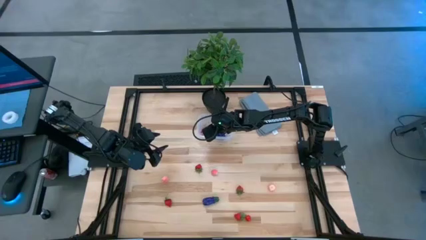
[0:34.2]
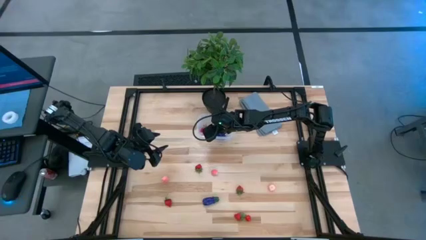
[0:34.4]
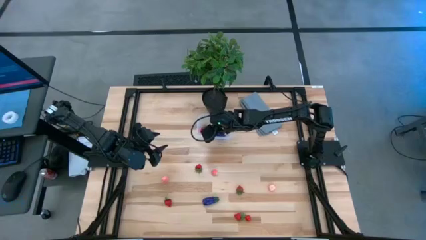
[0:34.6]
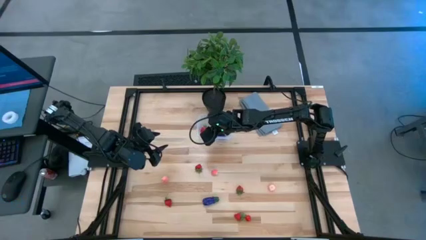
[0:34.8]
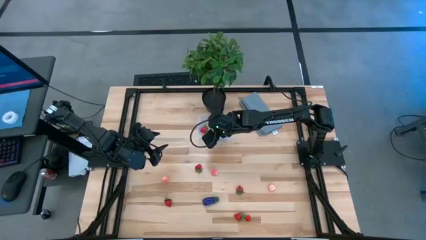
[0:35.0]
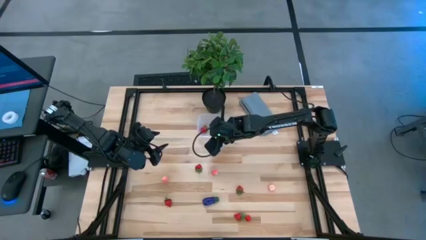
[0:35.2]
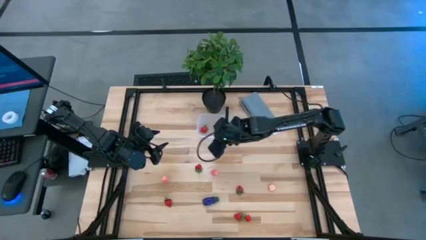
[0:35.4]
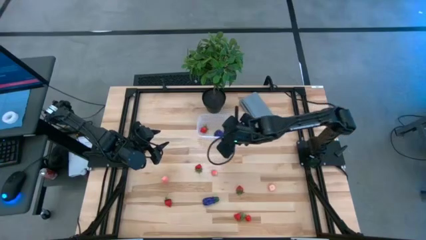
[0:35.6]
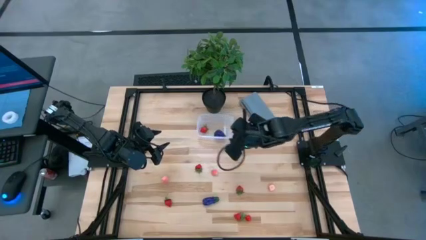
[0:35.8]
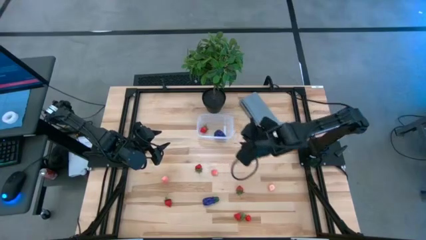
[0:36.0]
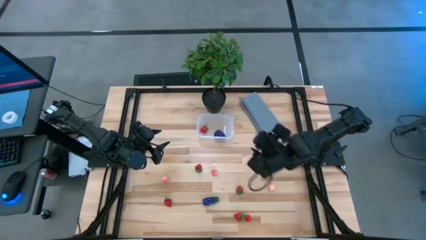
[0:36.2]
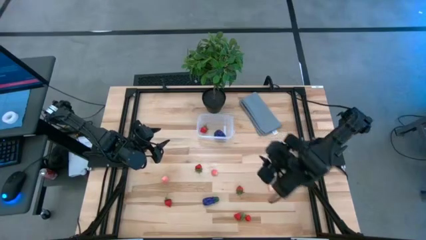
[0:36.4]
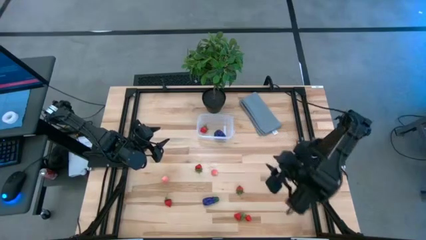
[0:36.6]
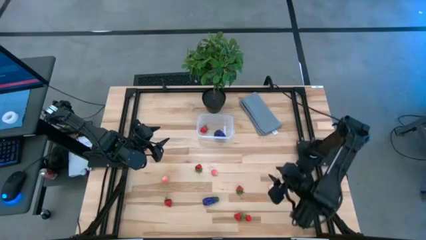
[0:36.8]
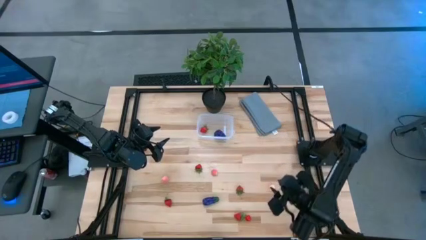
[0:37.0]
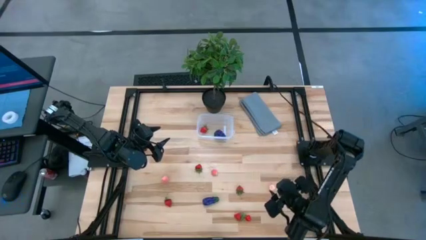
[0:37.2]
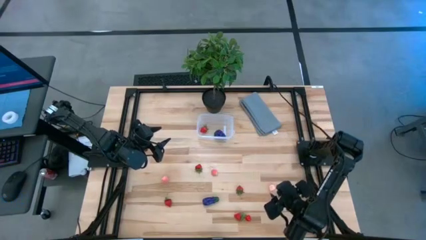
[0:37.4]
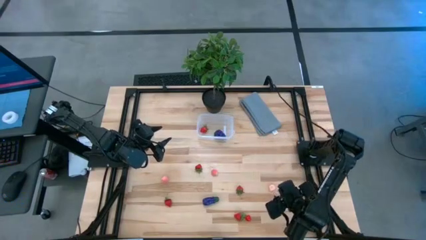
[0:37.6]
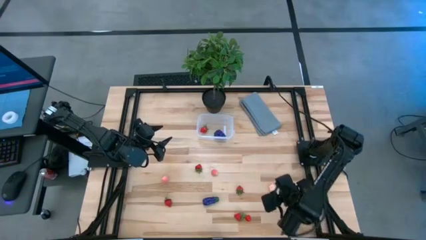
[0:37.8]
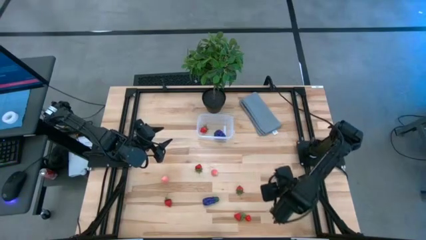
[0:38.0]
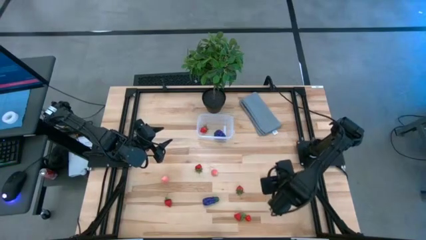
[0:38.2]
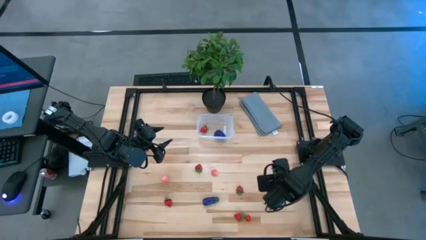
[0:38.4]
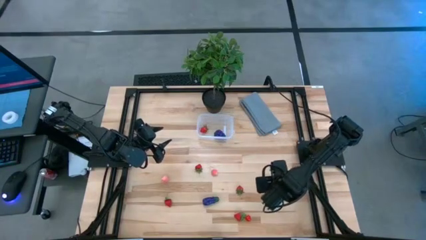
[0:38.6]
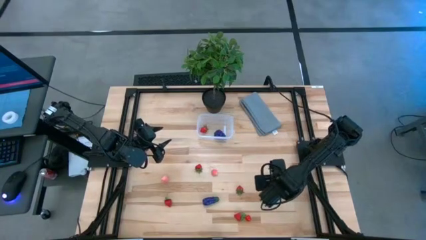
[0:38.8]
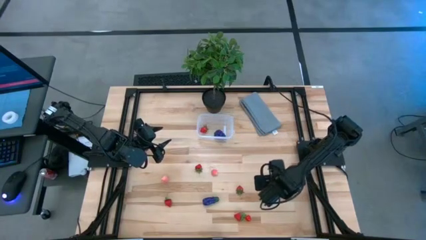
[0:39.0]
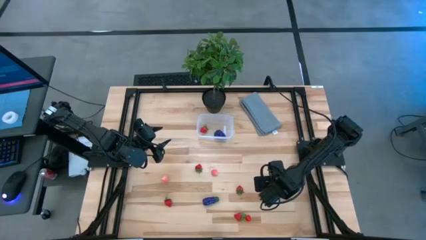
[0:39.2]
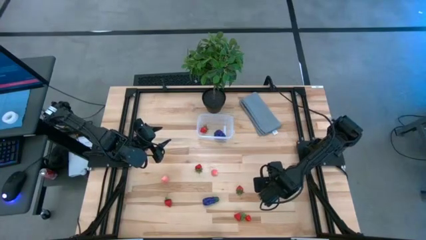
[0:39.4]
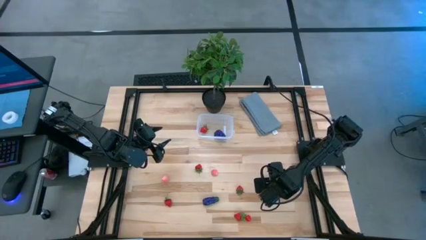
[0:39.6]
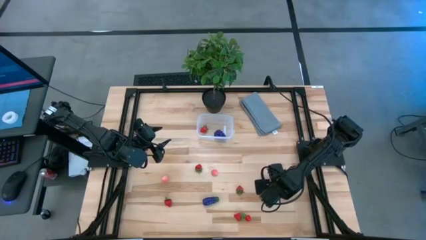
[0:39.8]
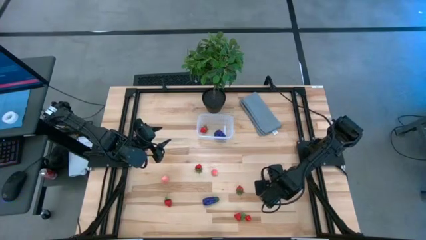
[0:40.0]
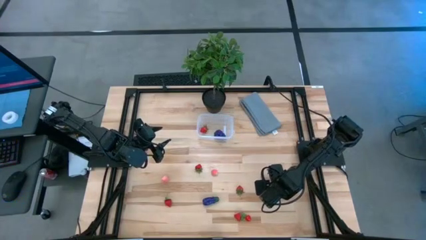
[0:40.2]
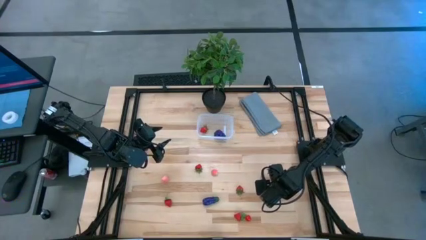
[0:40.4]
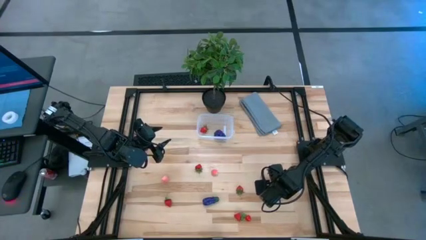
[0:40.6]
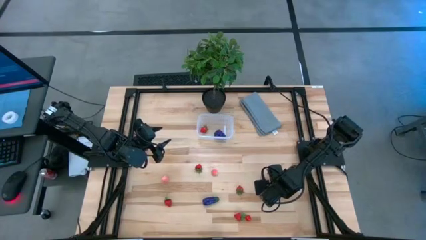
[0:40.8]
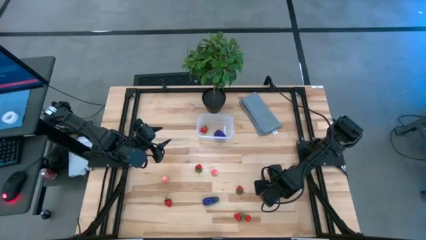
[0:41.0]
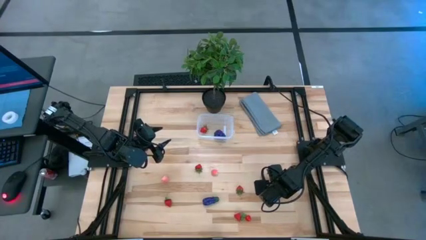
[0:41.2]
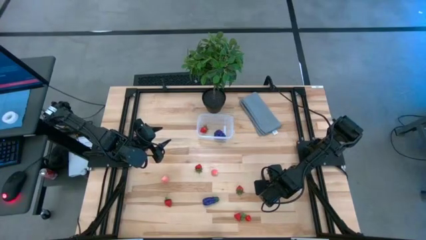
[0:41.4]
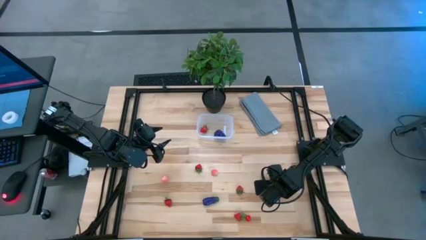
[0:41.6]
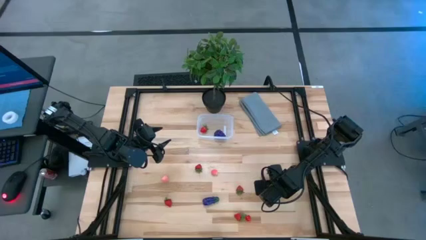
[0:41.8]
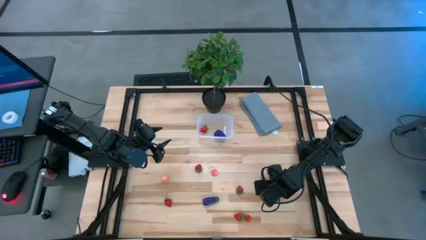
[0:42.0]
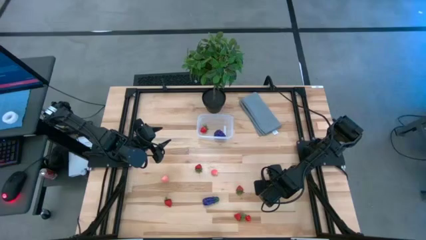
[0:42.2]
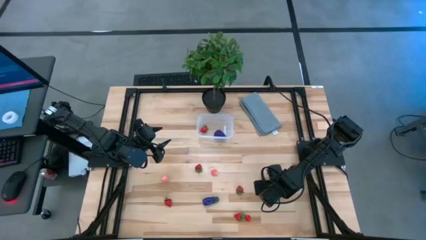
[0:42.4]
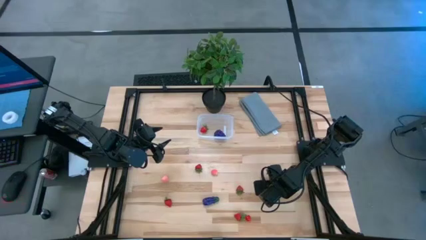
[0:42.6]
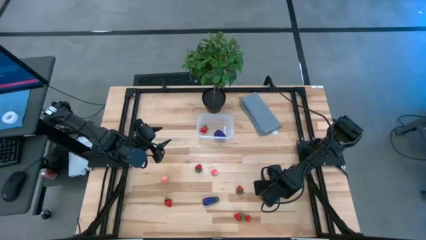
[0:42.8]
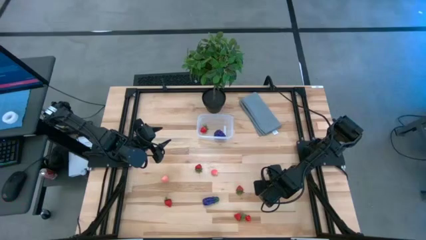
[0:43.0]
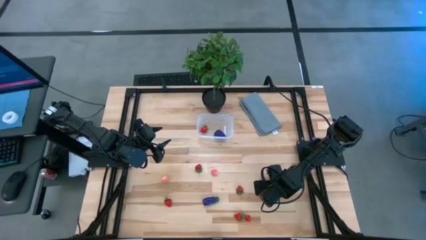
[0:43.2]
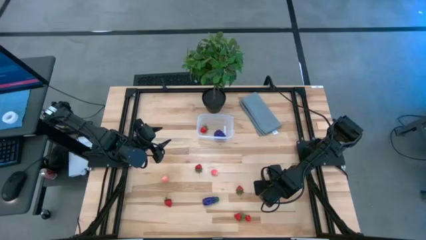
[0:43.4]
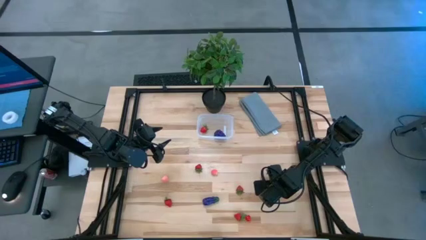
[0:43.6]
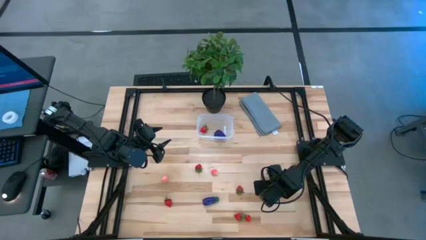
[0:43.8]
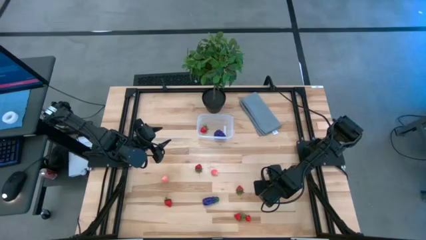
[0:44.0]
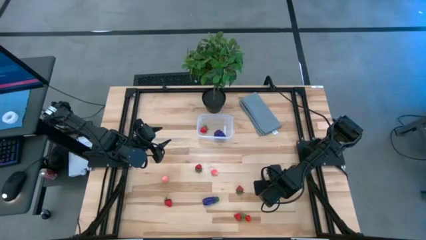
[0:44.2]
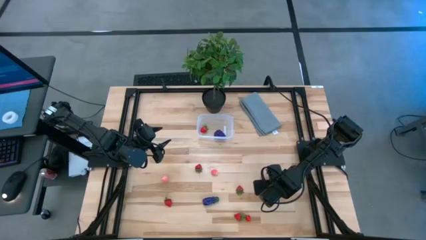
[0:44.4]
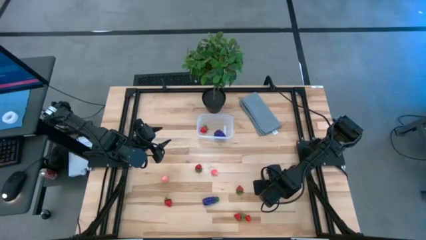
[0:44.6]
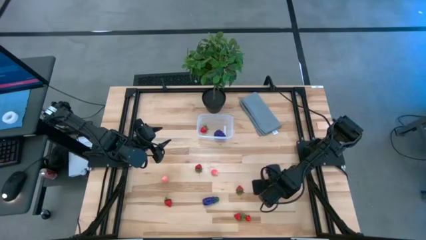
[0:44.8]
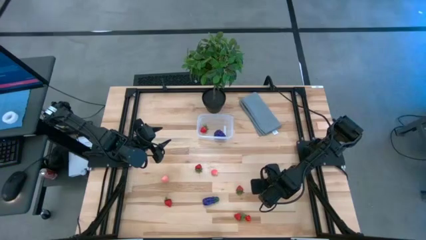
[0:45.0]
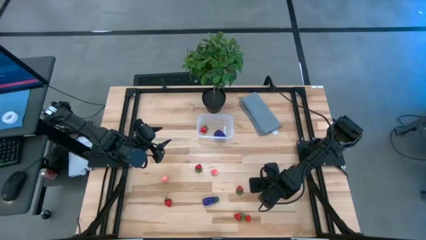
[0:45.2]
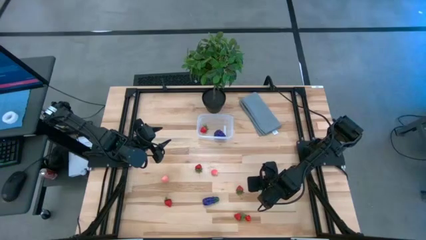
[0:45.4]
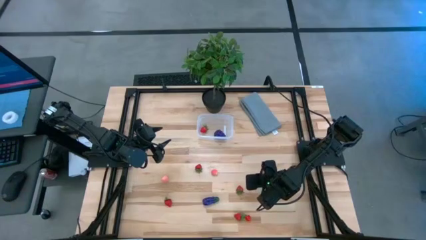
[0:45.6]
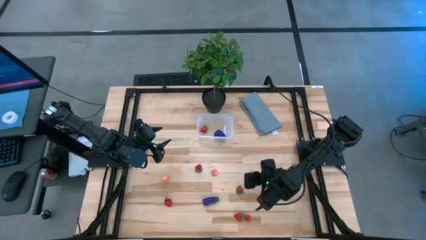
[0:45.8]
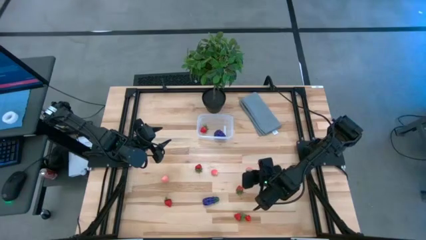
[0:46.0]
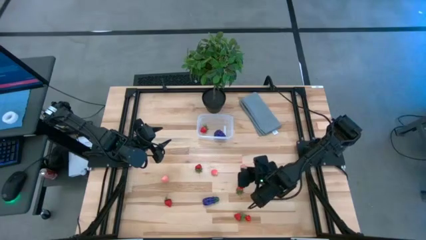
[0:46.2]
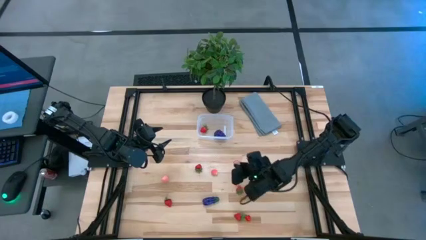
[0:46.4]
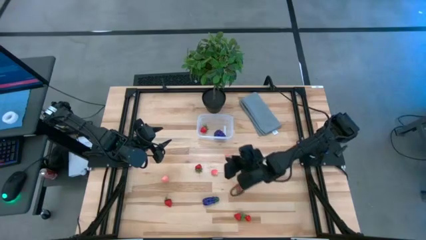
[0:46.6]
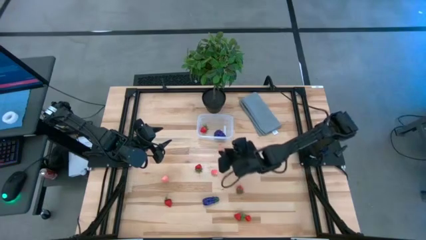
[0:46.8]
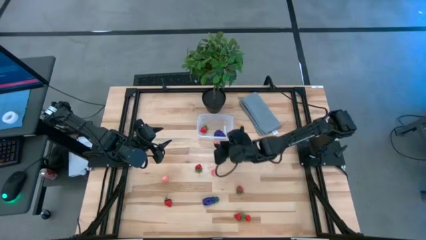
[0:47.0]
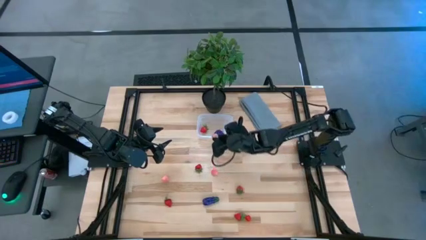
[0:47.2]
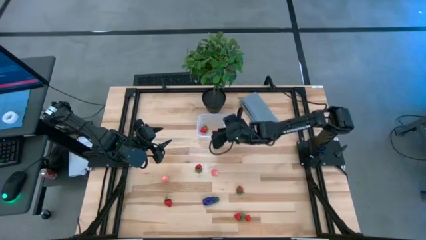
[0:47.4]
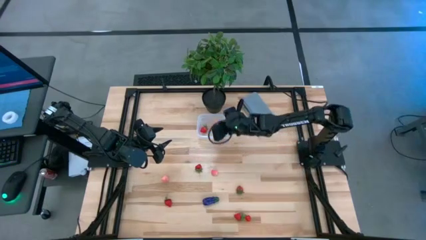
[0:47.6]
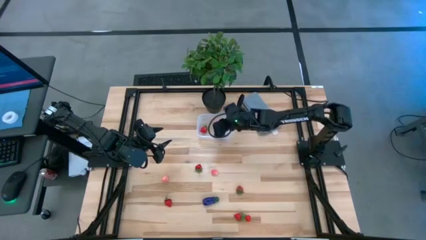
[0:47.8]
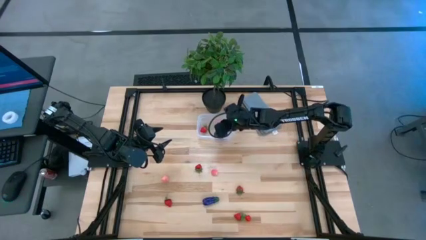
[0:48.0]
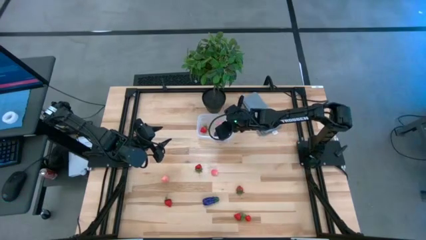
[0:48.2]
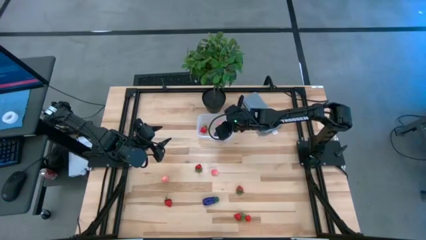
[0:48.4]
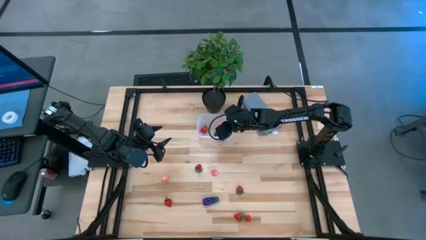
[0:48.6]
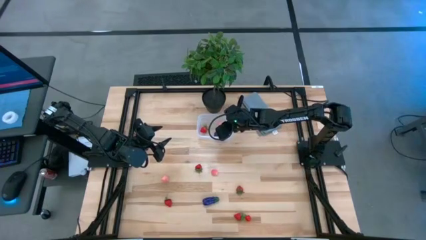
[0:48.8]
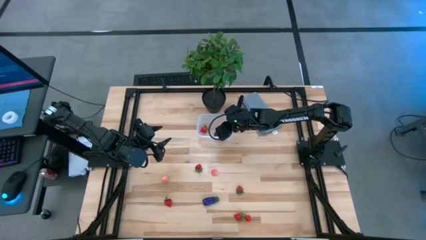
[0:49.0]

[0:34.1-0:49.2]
Task: Pick and placing Produce into tupperware
Put the right pink peach into the transparent bin
